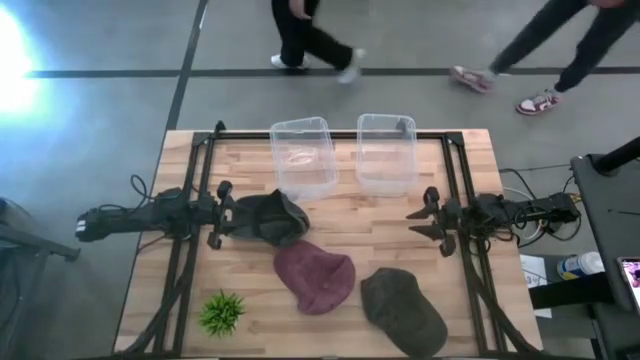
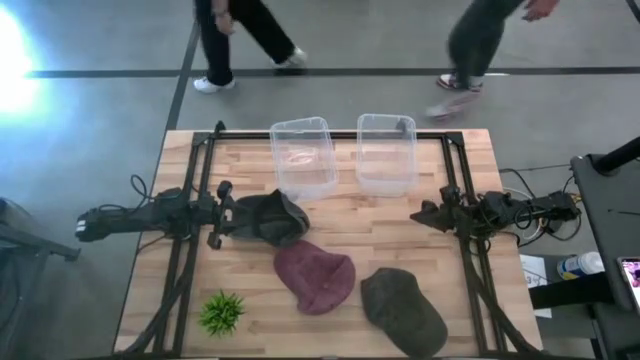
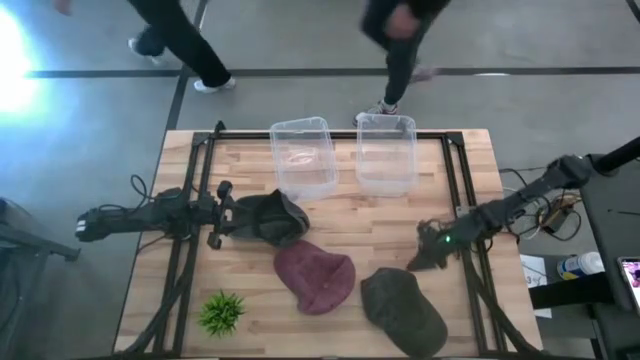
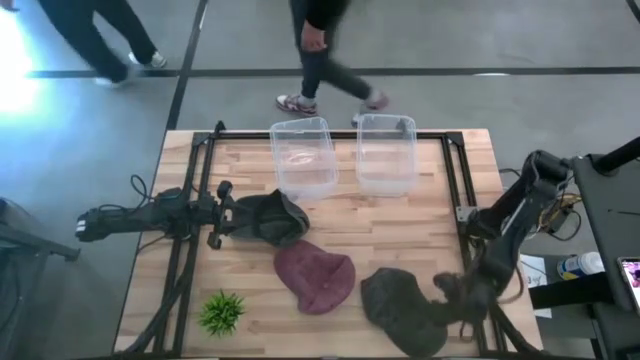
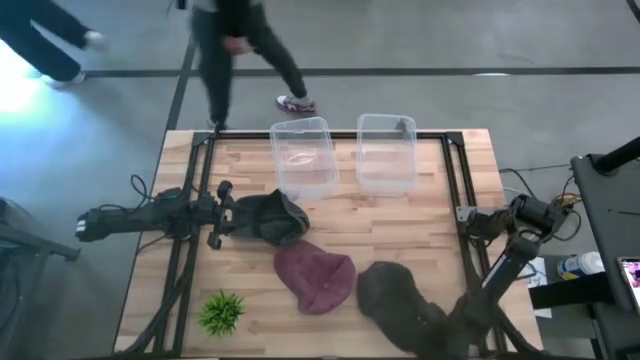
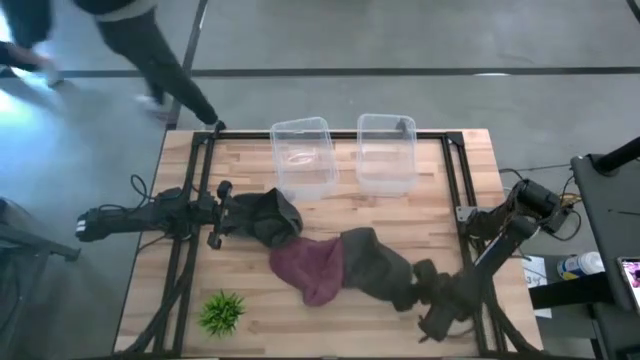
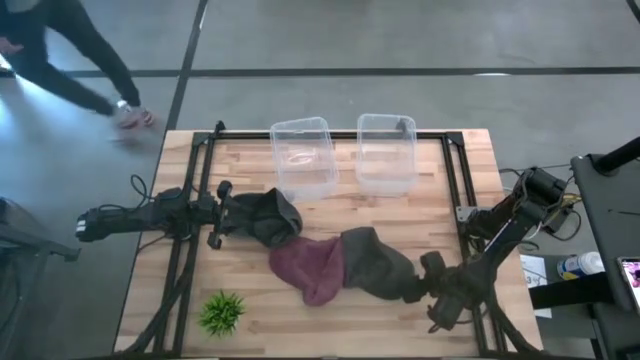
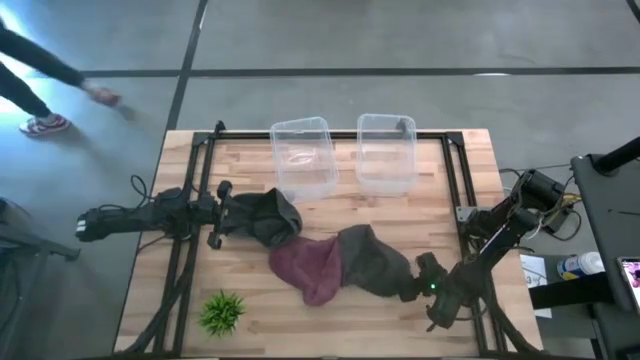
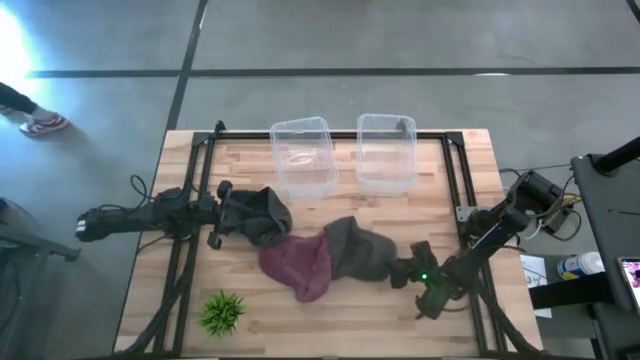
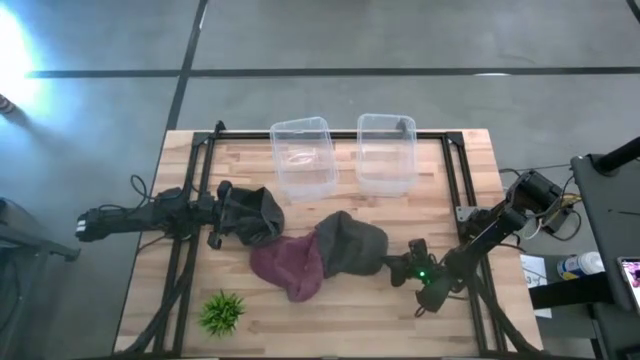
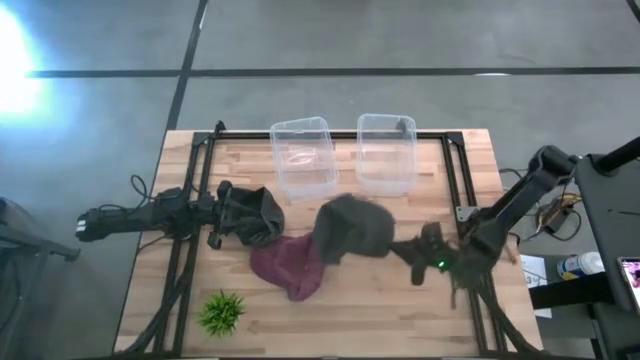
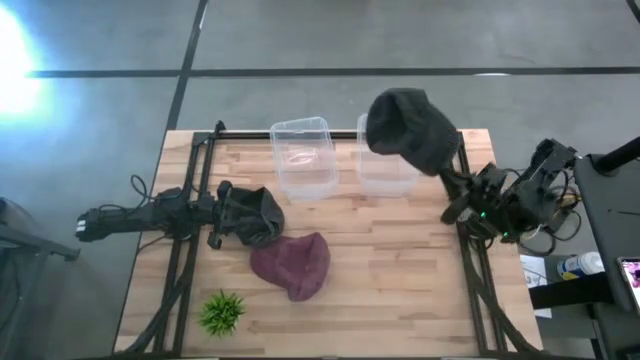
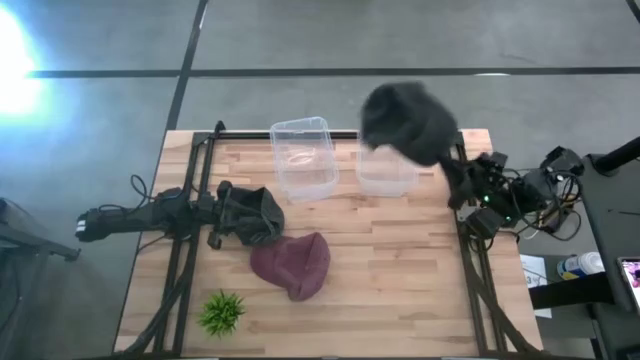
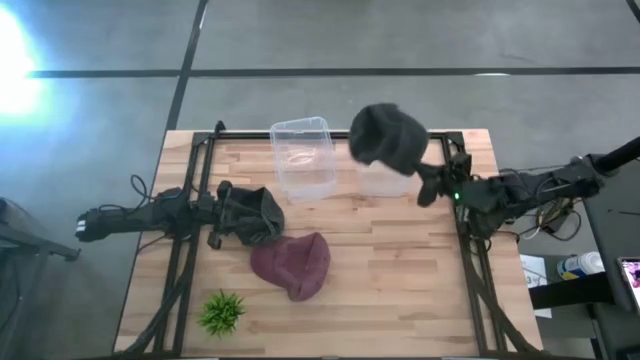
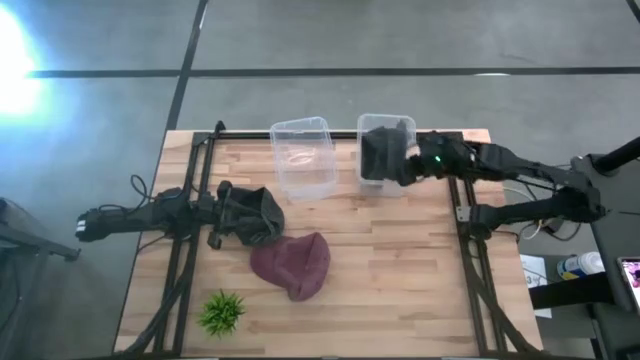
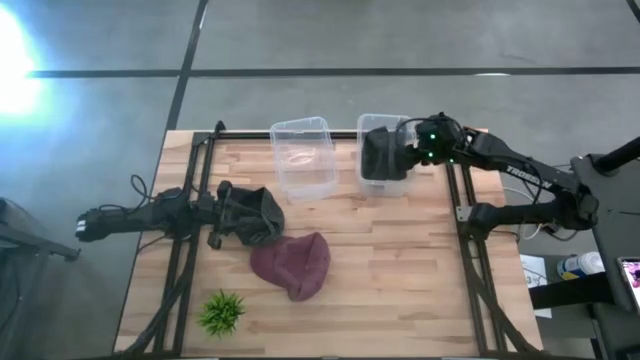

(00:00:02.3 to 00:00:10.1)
Task: Pick & Place hat
Put the right black cap into the right transparent bin

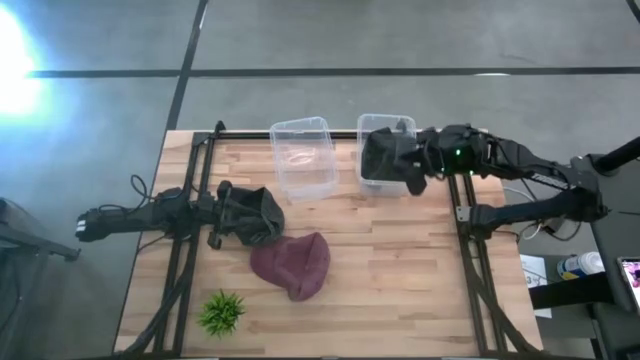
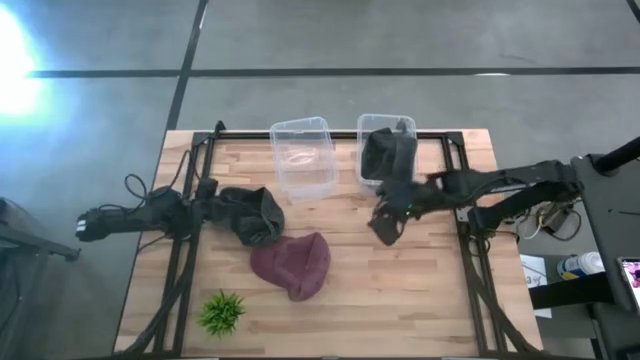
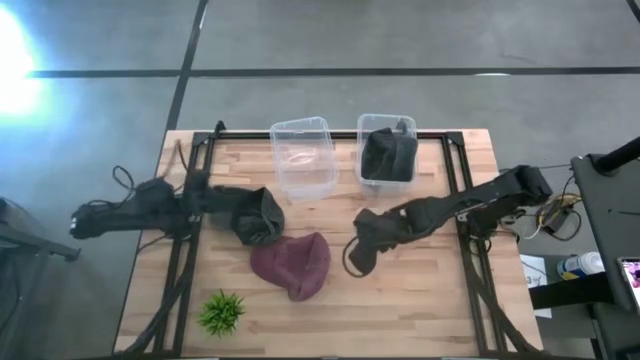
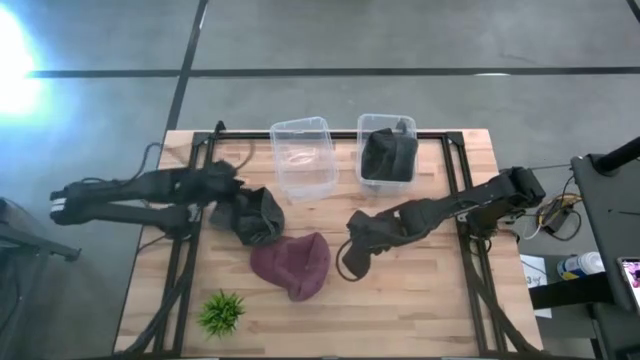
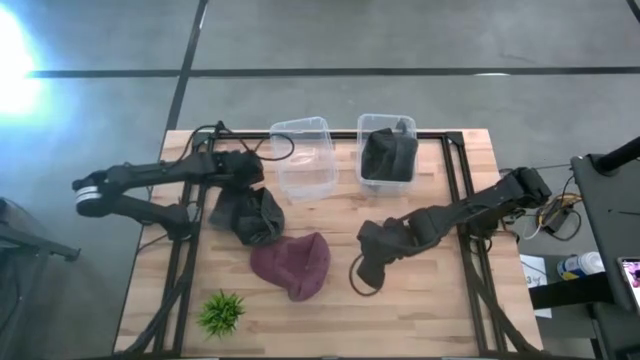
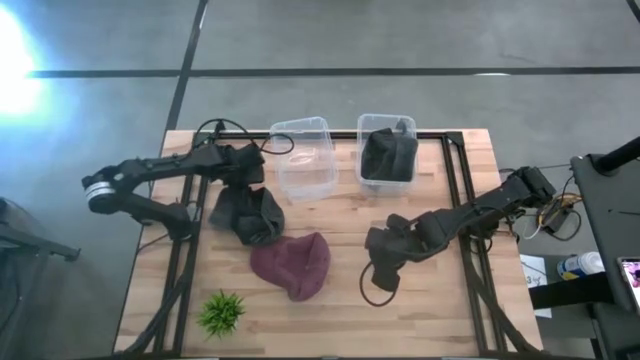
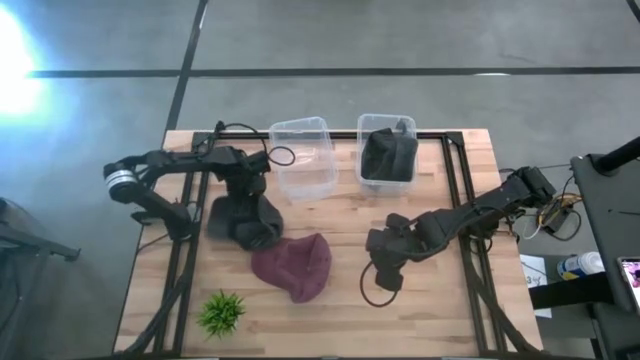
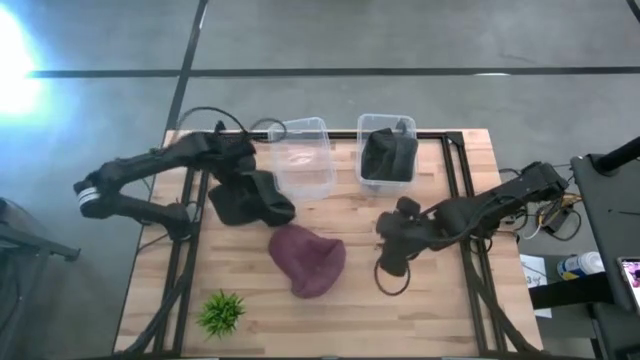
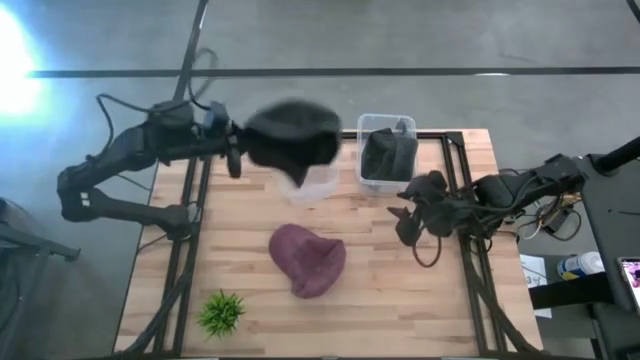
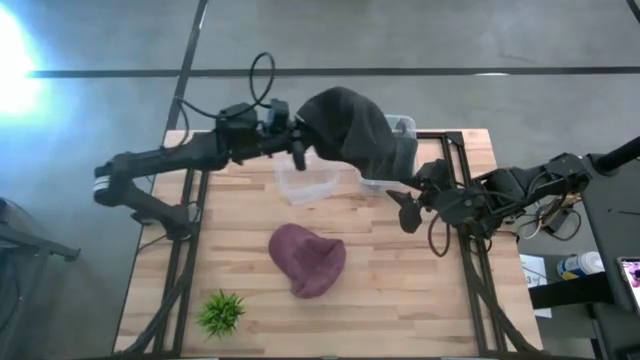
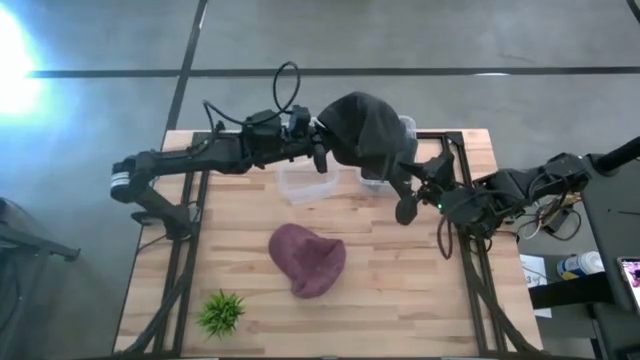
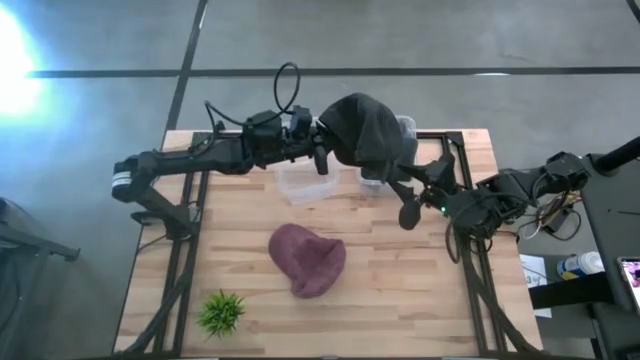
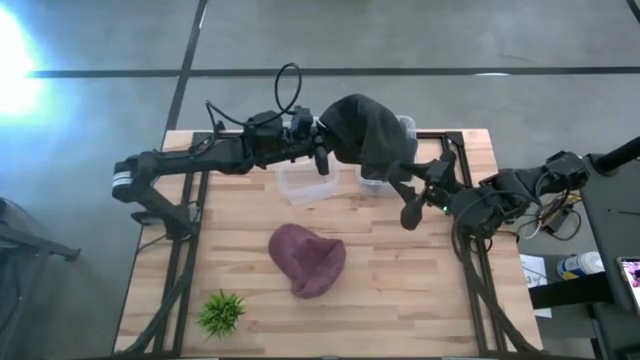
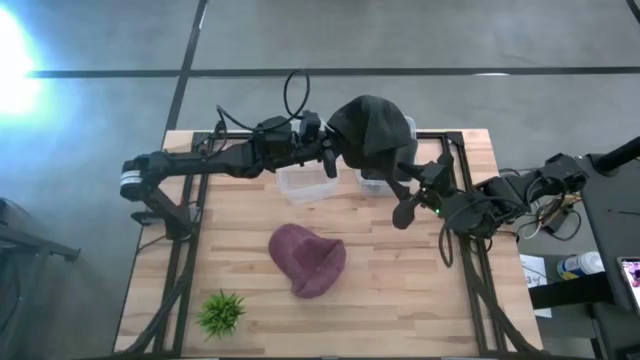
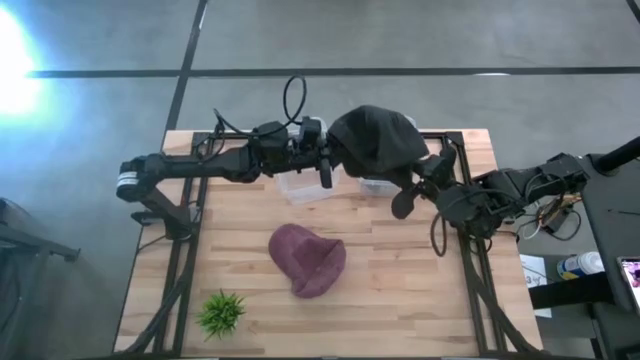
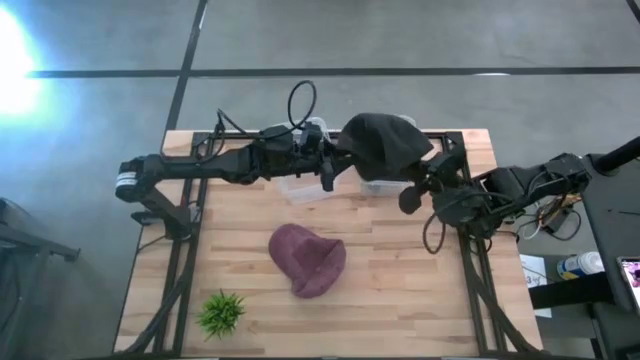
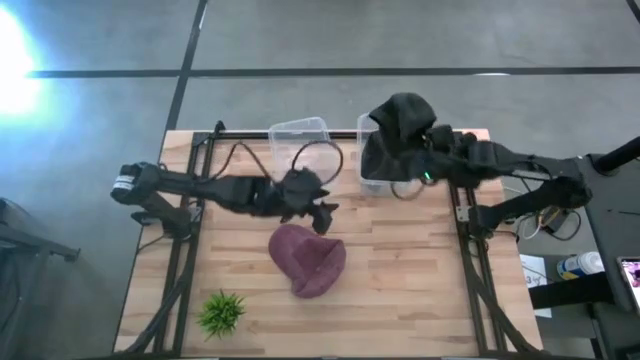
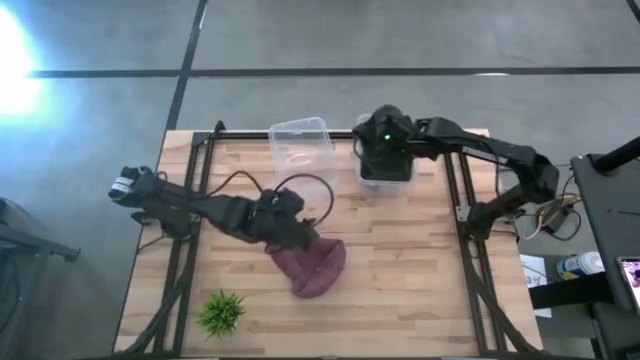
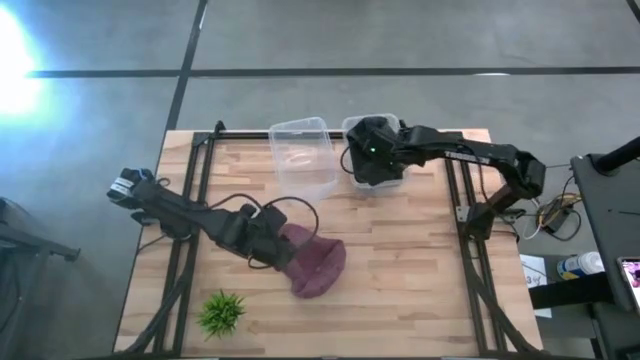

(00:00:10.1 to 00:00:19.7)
Put the black cap into the right transparent bin

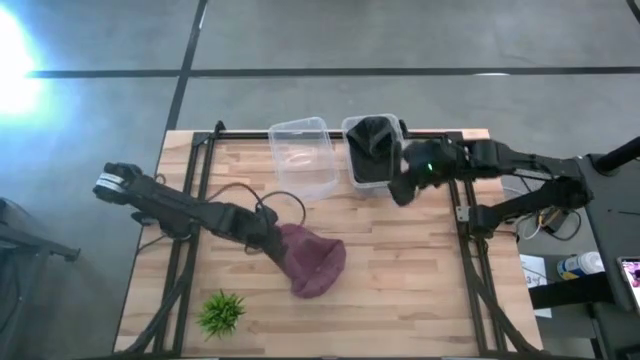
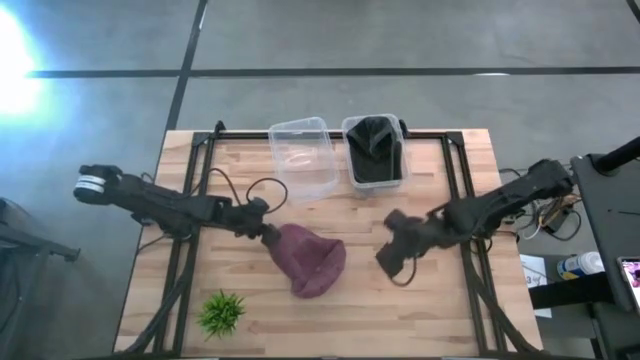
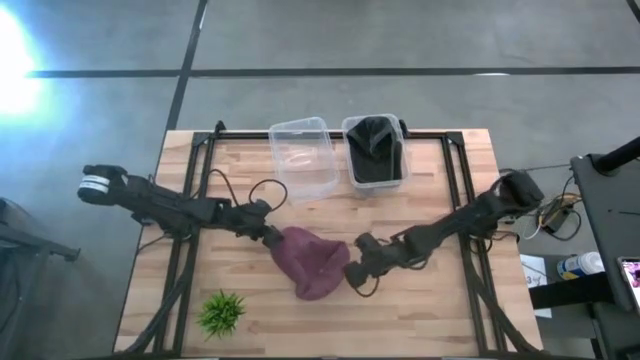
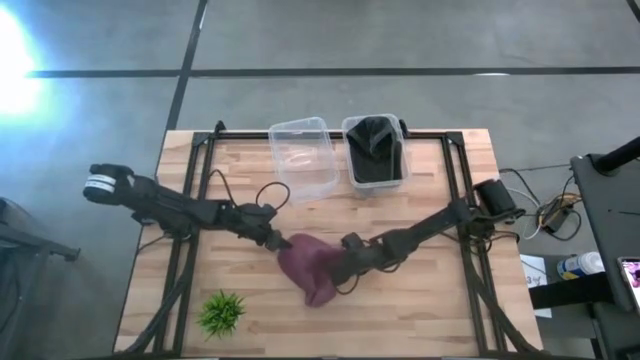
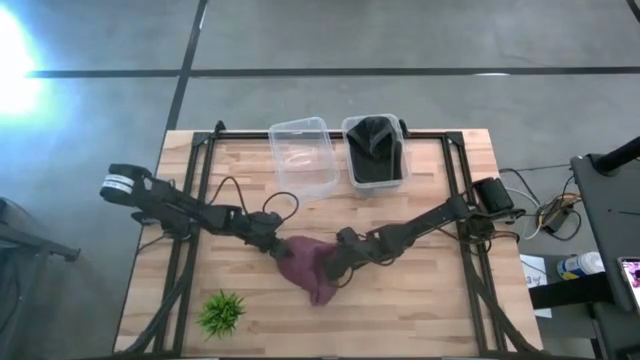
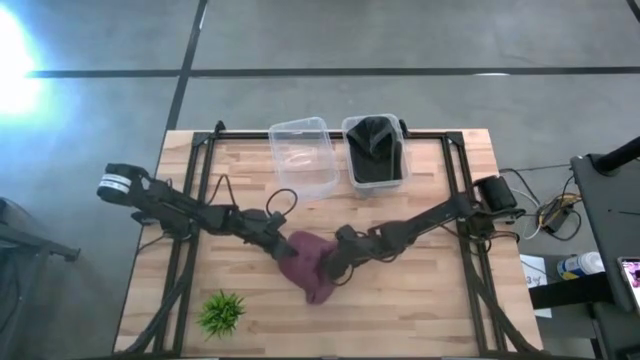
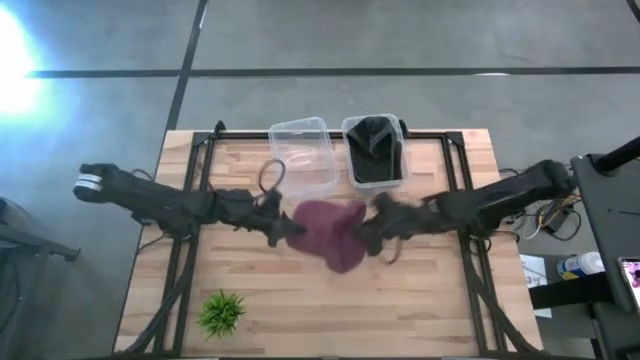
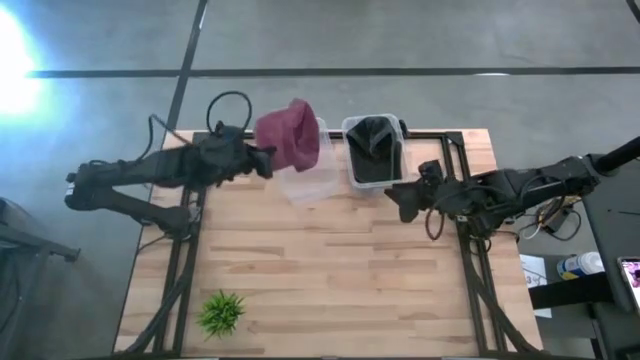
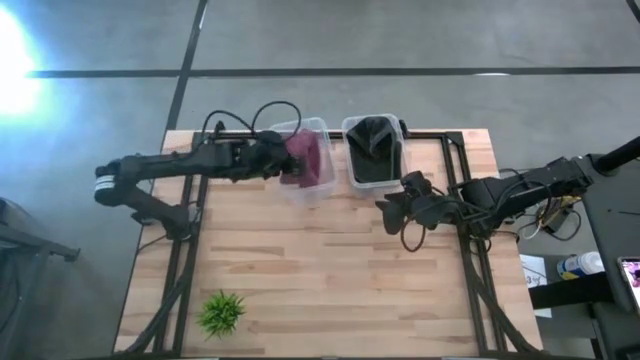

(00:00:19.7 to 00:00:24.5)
Put the red cap into the left transparent bin
